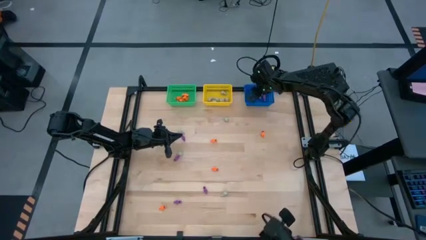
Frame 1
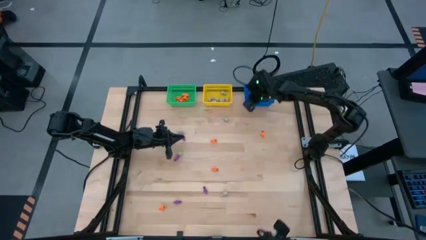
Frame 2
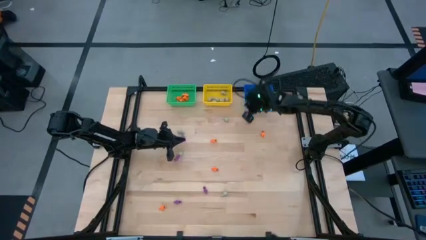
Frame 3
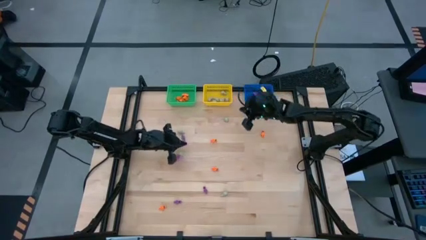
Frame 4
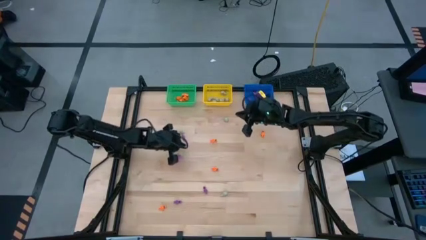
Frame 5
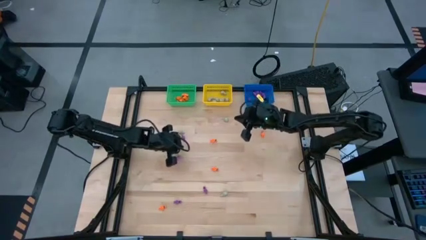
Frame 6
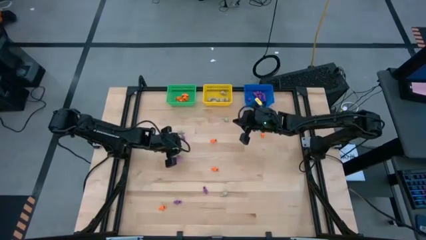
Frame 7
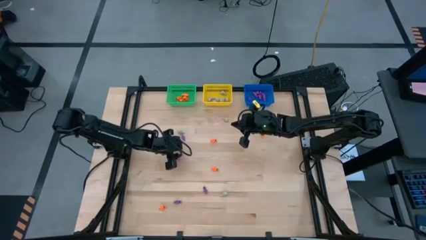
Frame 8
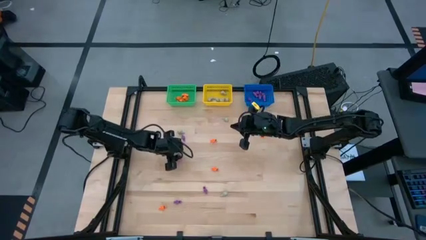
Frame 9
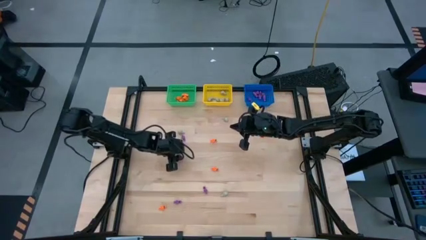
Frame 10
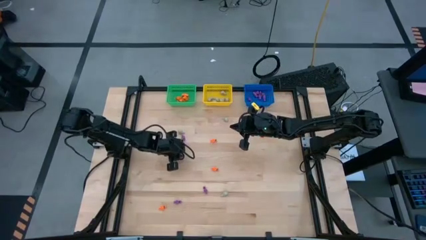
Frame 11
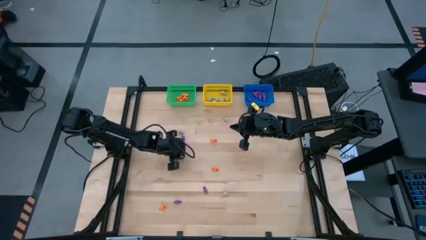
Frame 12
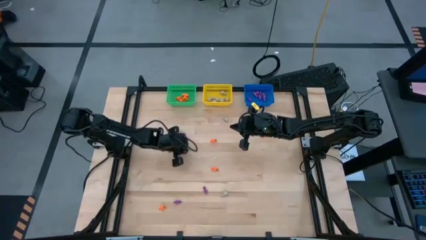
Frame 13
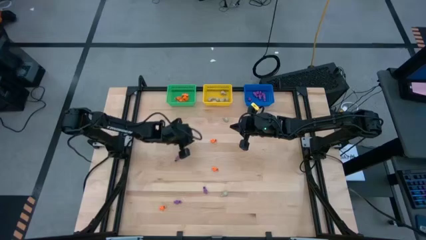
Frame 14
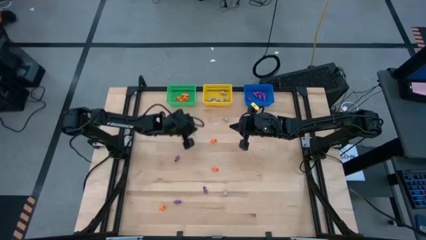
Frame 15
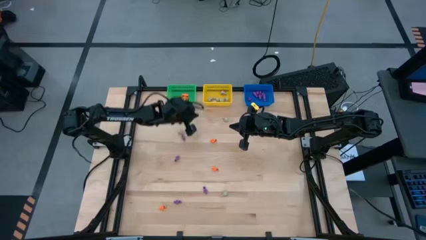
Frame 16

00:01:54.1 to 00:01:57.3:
Task: Sort Halloween decoration
Put the white skull toy into the yellow bin

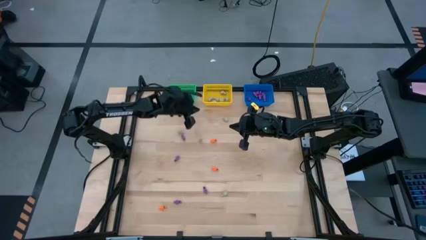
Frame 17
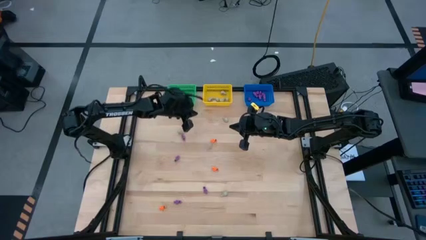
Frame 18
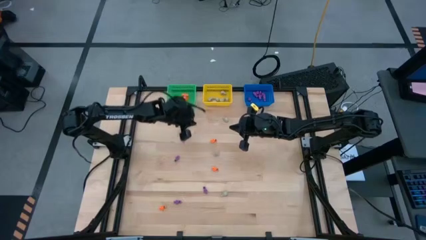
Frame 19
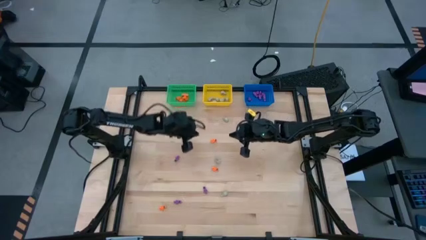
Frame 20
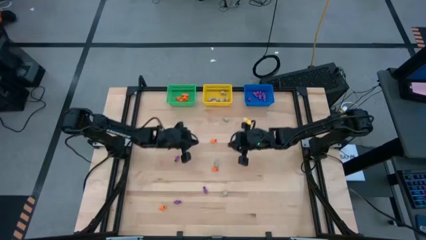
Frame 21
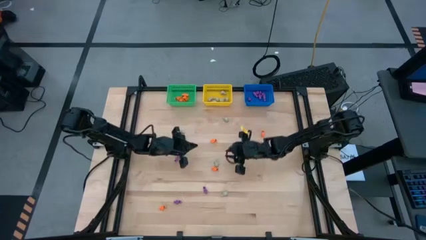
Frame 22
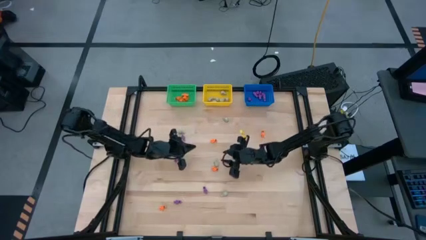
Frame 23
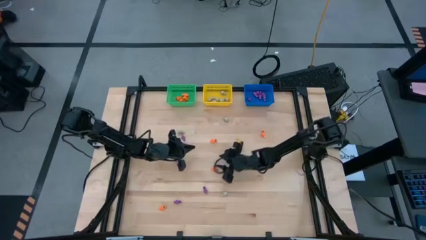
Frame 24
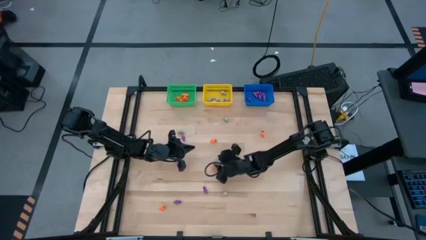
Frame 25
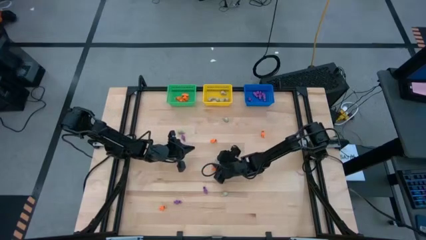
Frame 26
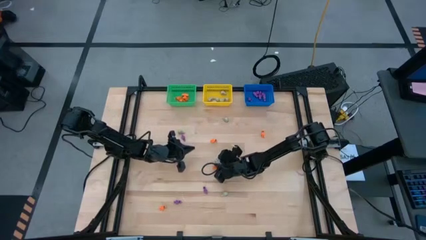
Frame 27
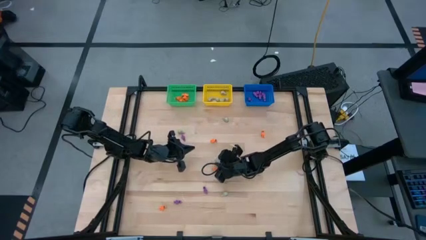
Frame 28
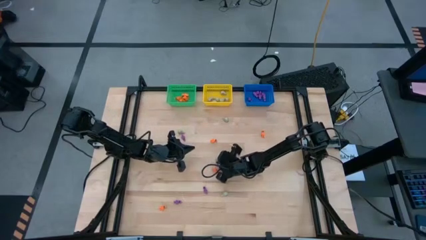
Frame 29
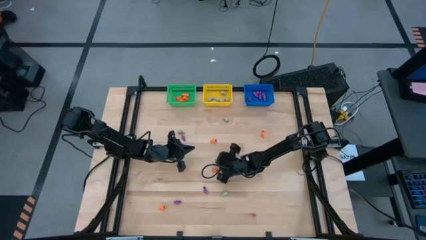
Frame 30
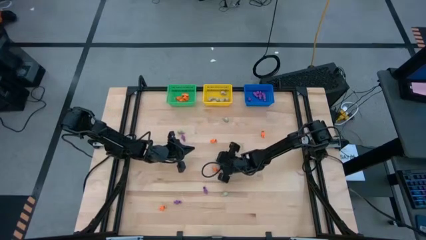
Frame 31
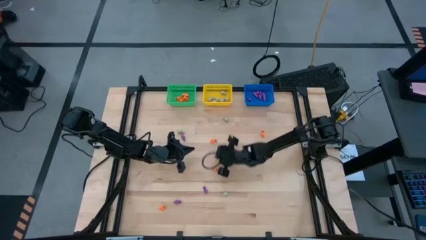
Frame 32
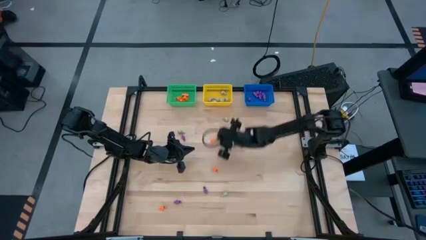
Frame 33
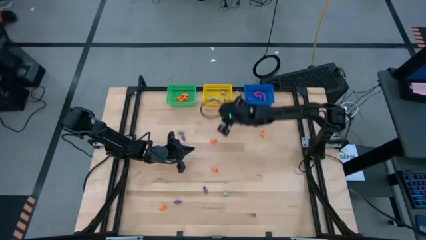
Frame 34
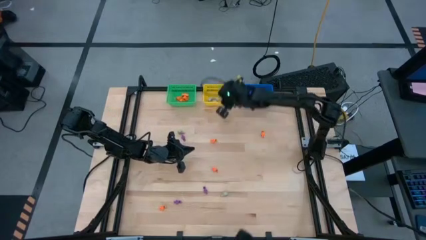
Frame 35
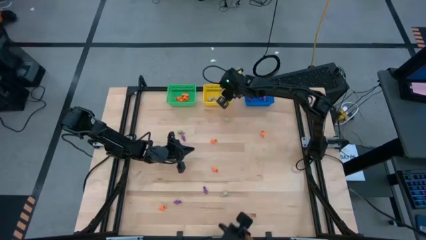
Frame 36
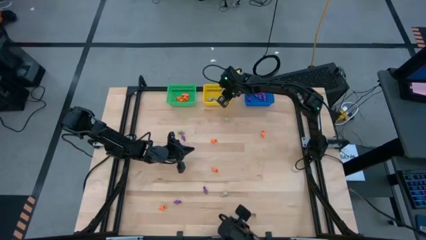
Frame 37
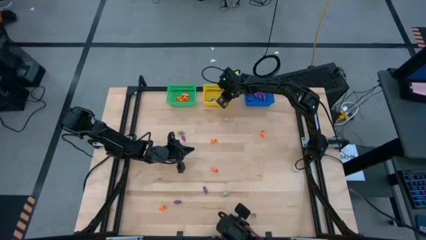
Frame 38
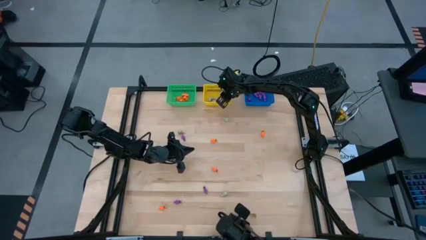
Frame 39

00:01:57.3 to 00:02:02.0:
Put the white skull toy into the yellow bin

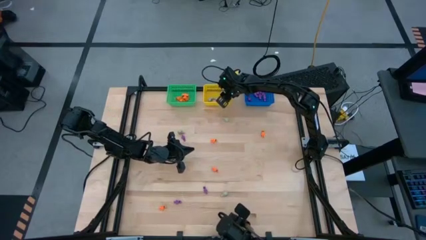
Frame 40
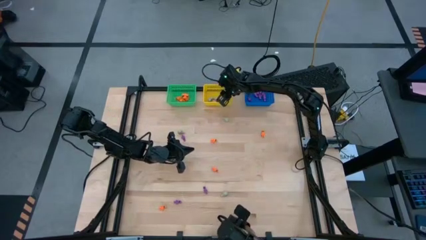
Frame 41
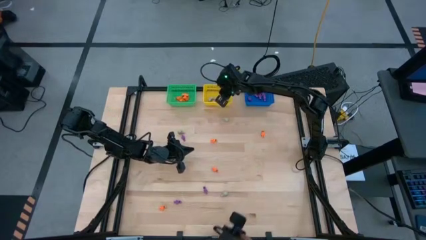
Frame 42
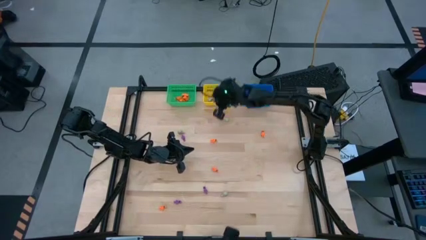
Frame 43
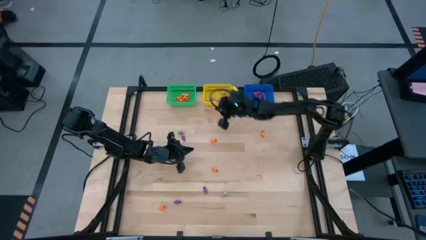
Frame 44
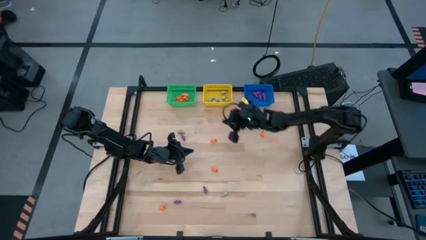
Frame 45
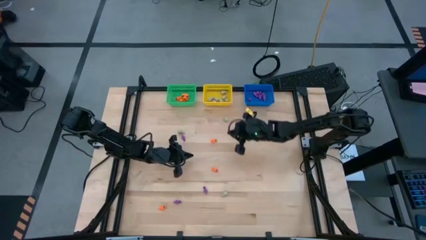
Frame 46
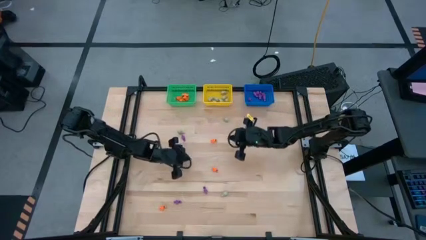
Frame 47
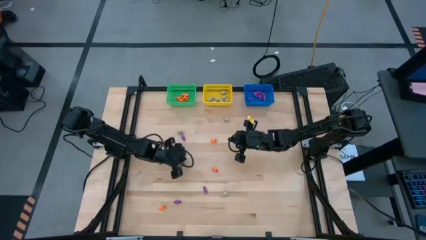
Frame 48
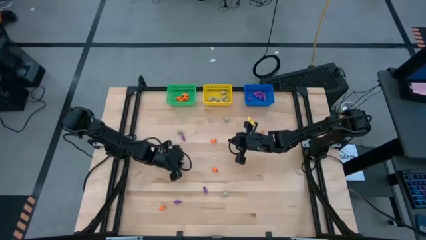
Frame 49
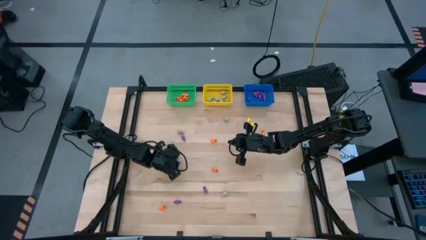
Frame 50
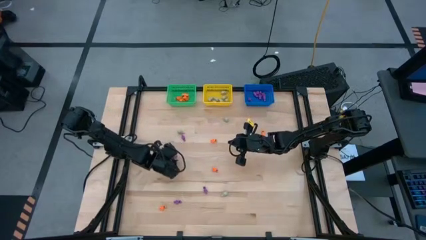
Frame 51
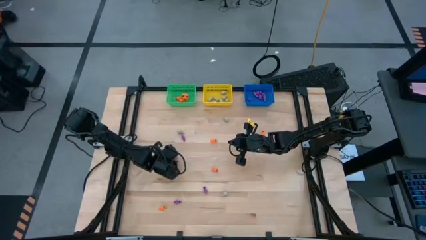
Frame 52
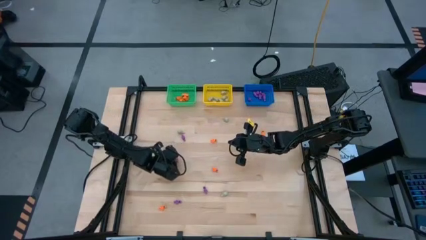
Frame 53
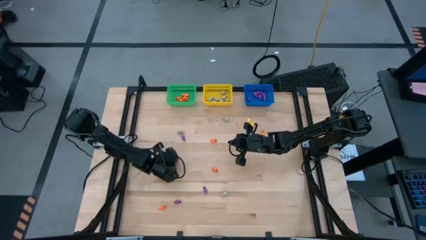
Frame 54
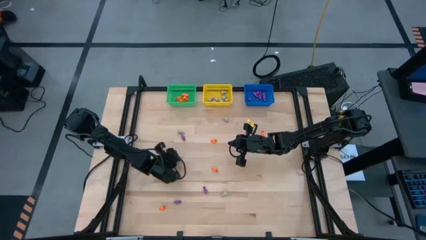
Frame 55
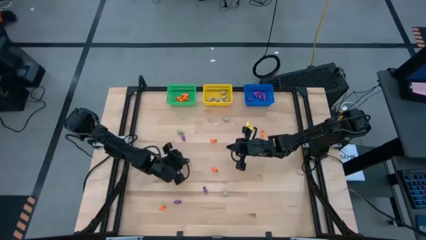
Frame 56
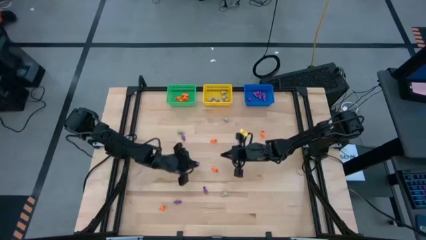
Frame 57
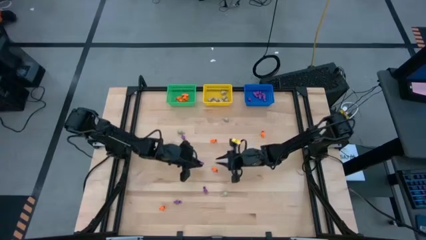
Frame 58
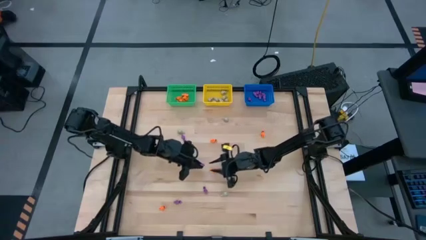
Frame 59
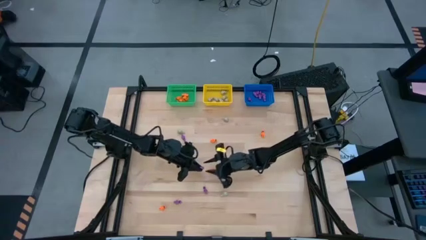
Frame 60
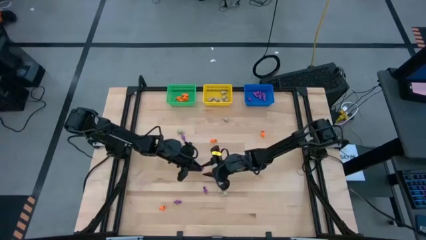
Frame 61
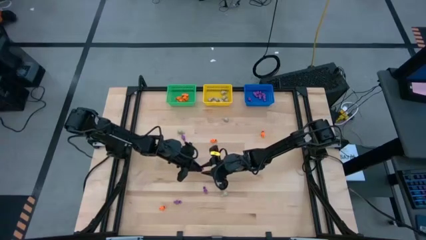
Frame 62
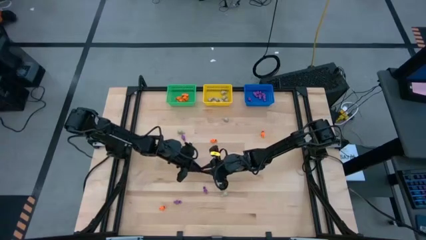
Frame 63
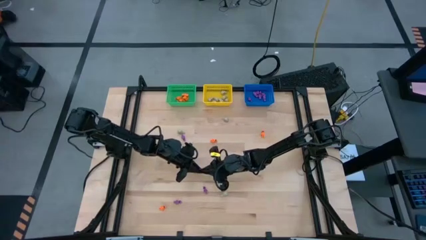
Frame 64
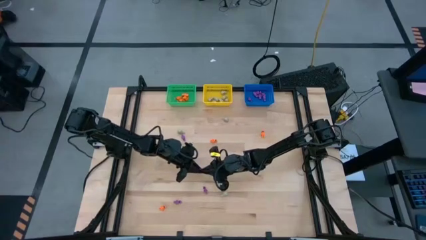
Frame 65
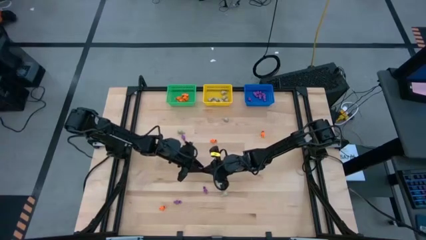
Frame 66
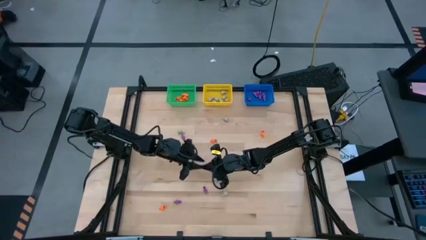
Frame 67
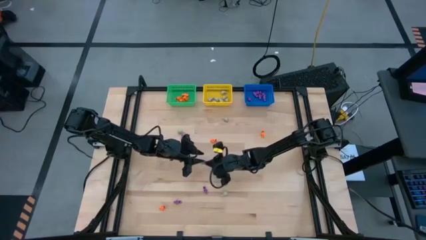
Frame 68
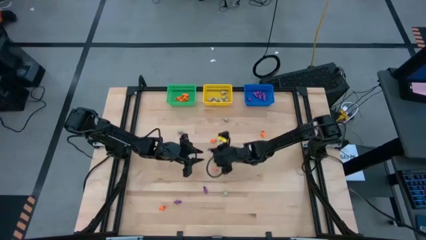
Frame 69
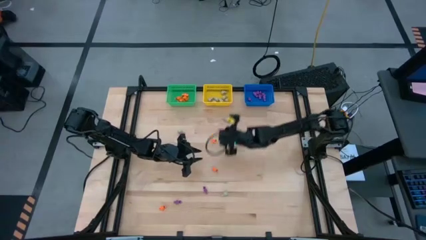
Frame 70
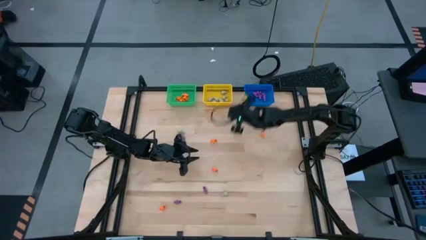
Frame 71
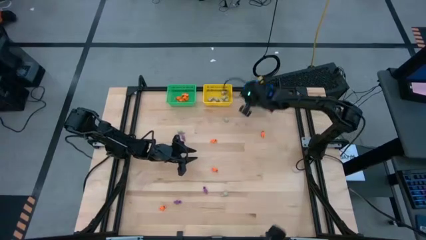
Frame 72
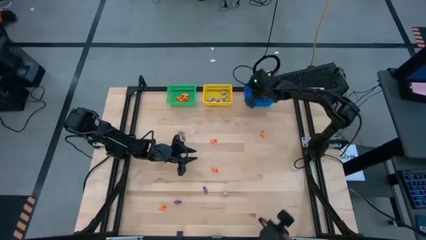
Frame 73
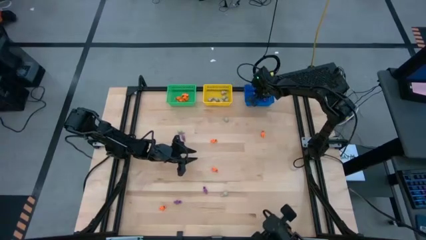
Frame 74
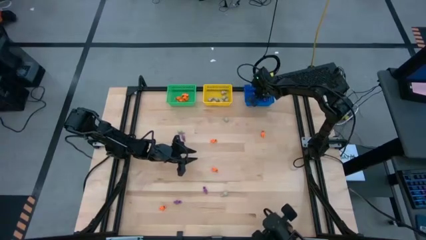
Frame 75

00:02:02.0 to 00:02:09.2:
Put the violet skeleton toy into the blue bin
